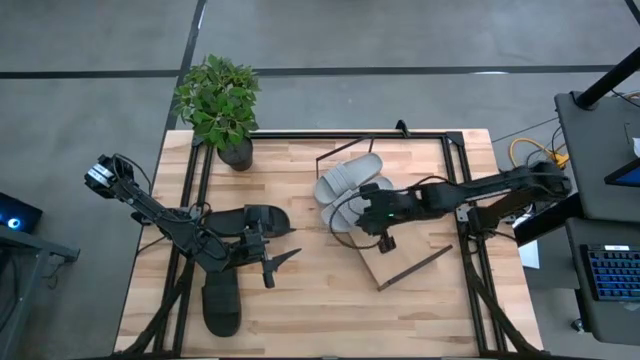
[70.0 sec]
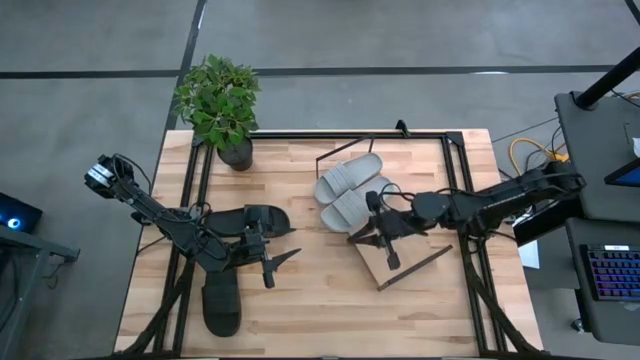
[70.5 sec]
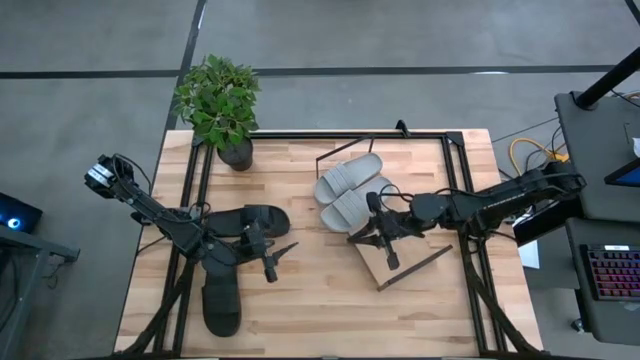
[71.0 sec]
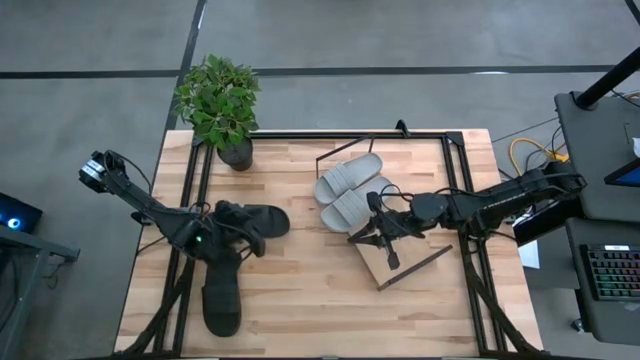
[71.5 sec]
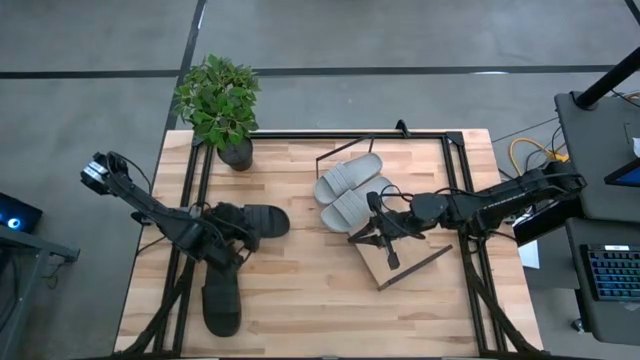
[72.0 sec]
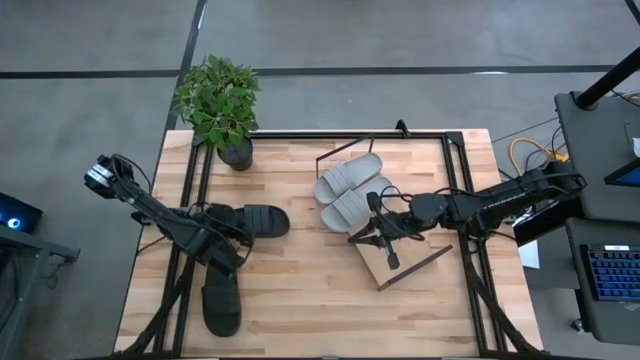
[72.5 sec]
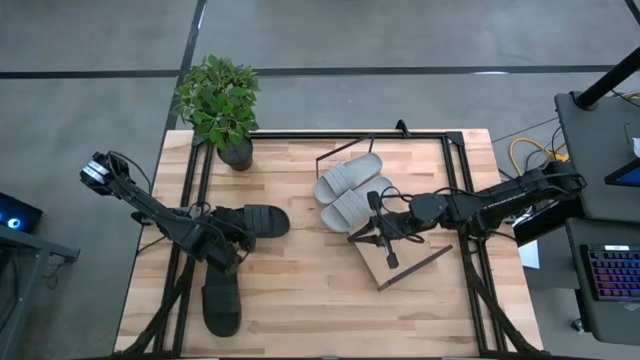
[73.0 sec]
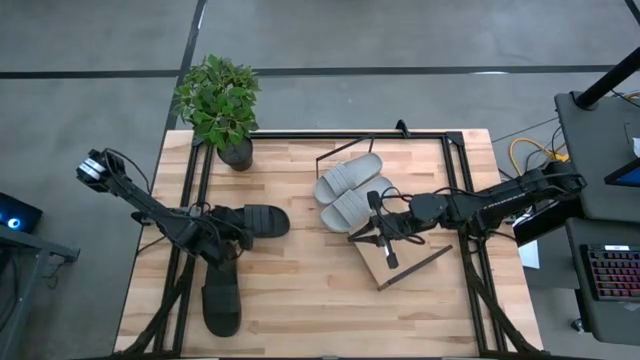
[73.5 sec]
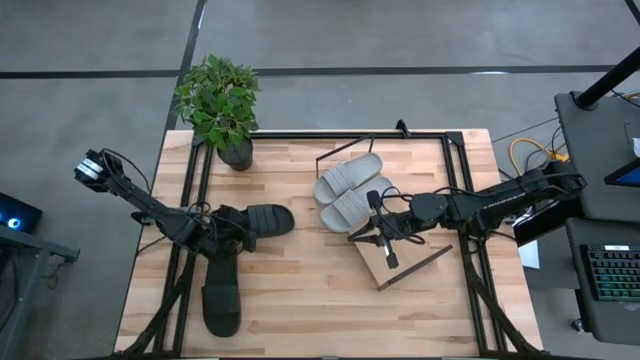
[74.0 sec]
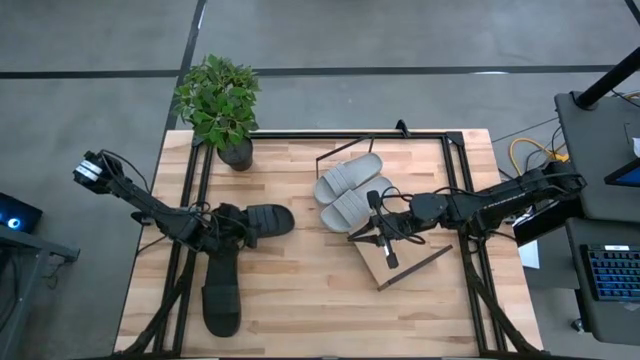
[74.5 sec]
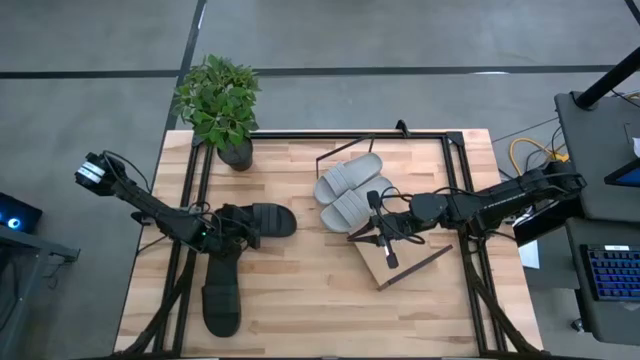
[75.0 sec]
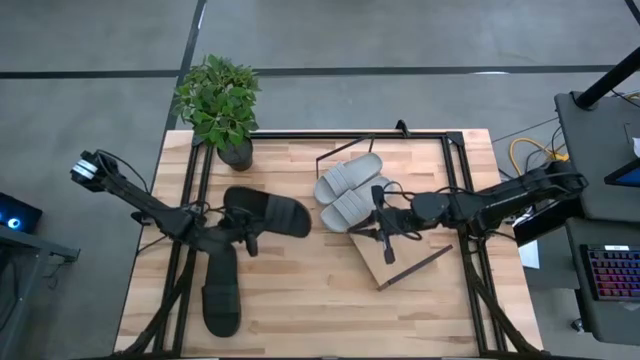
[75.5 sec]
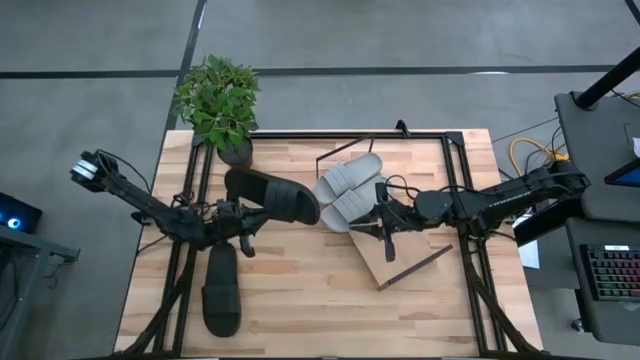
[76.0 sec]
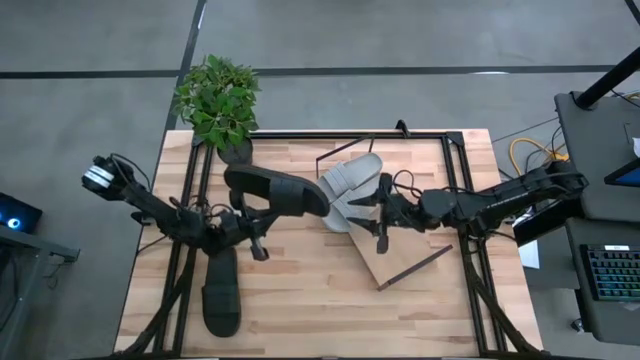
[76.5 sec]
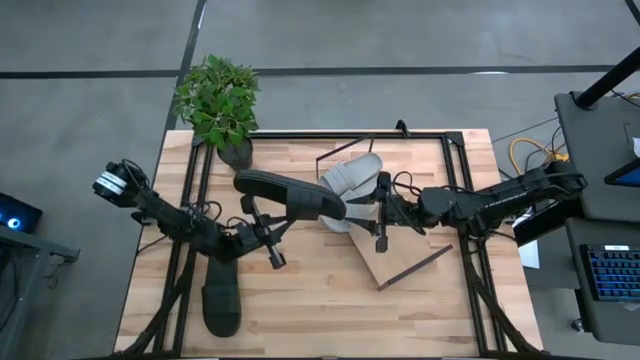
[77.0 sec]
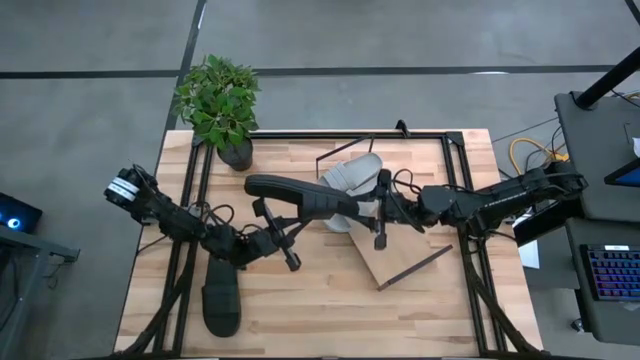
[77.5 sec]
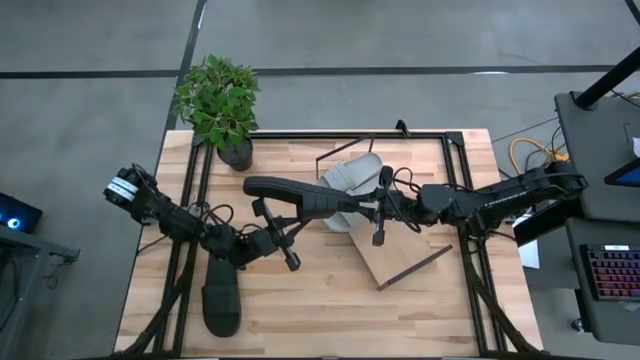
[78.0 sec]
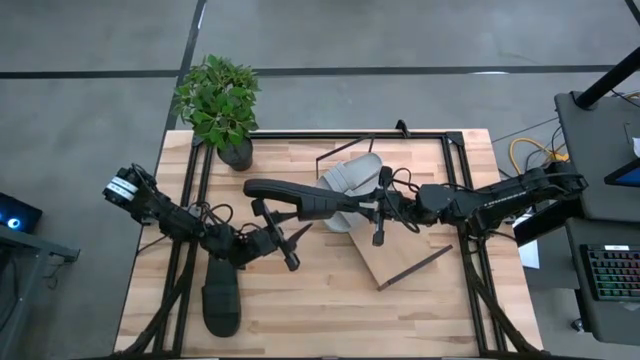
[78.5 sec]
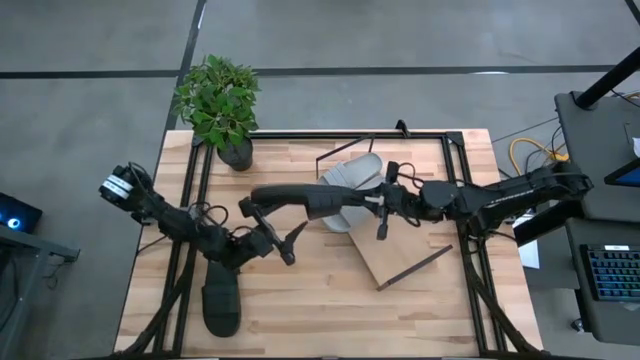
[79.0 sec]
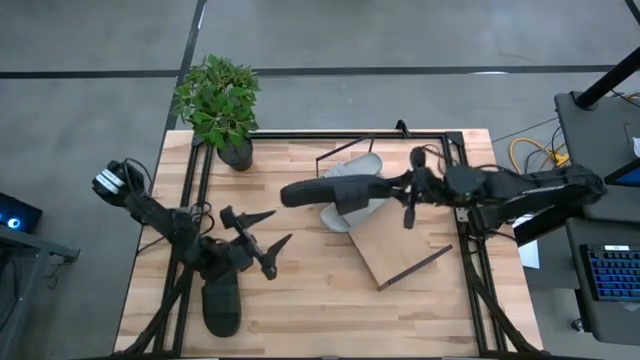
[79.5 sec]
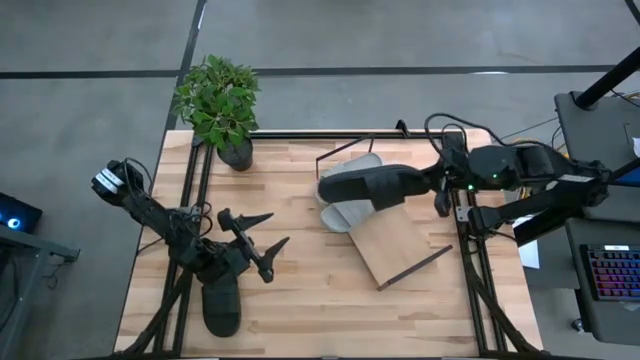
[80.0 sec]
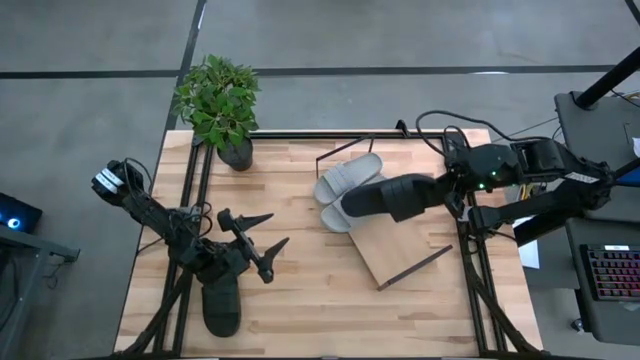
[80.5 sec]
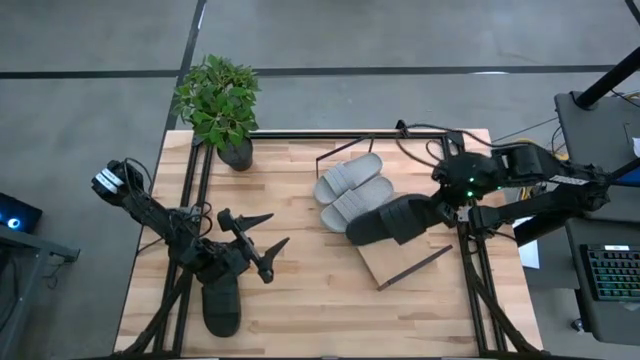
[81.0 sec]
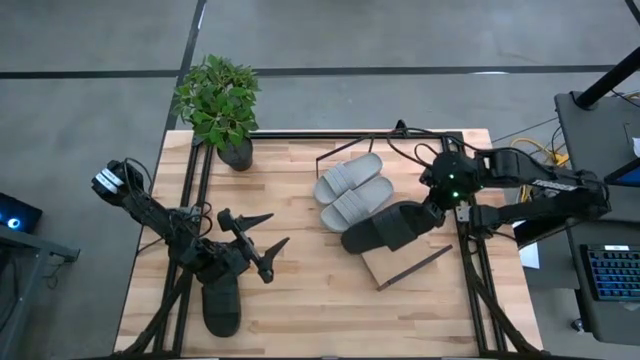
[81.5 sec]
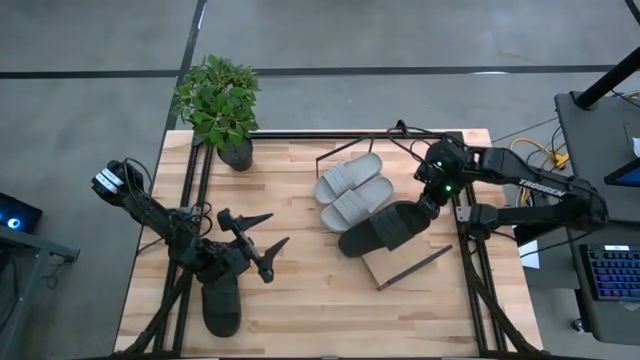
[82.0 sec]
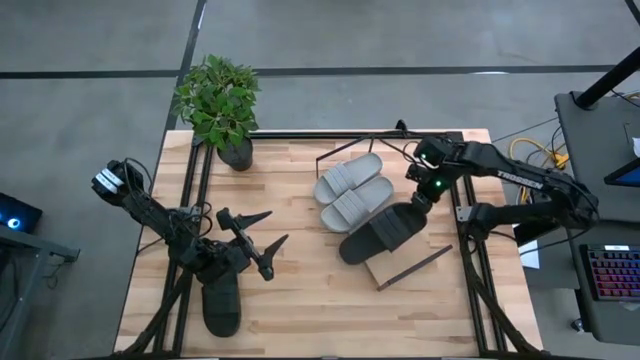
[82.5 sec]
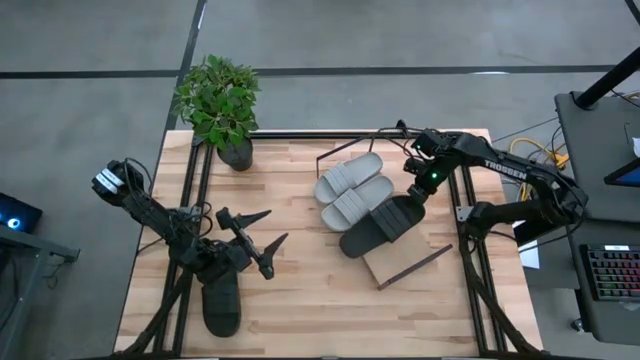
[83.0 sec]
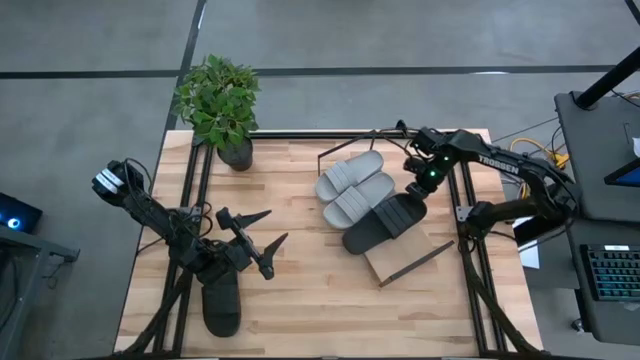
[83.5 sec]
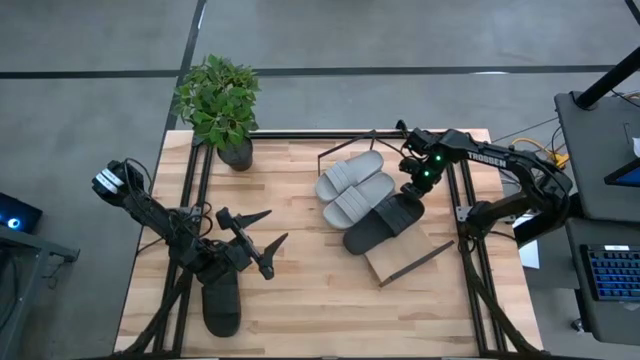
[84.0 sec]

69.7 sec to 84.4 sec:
Task: Pick and place slides into the shelf
Put the top black slide on the shelf

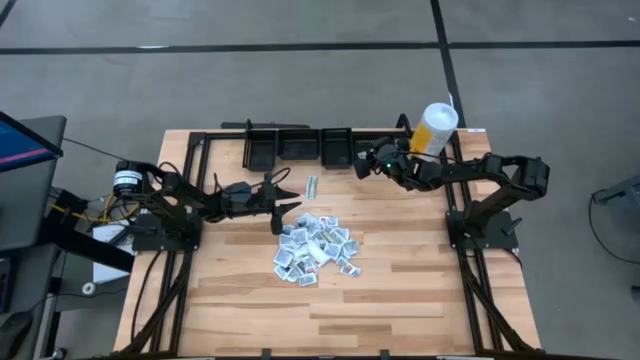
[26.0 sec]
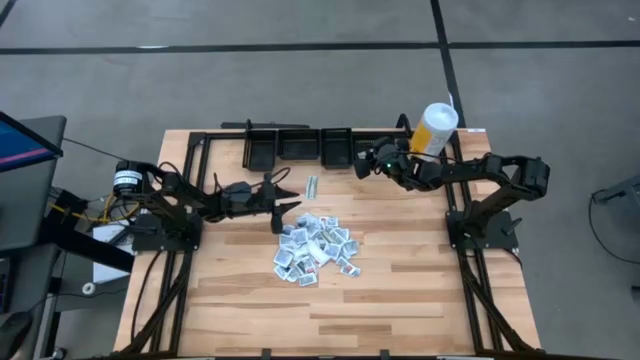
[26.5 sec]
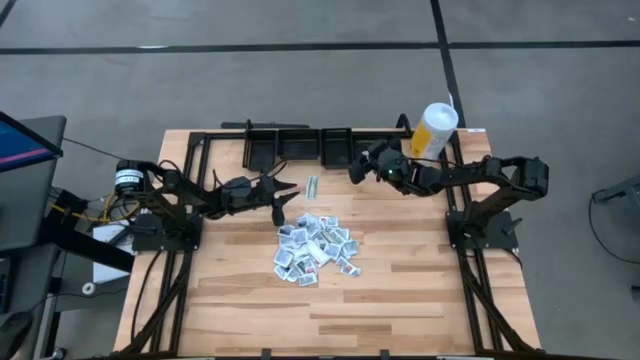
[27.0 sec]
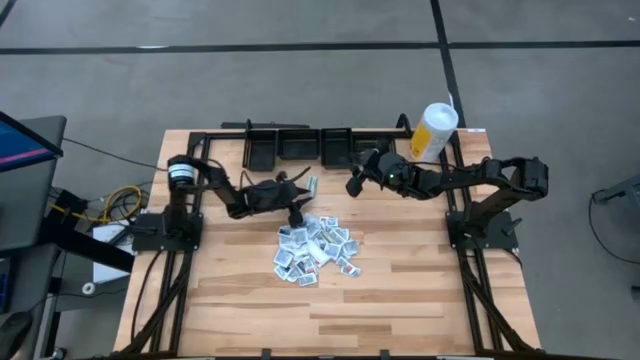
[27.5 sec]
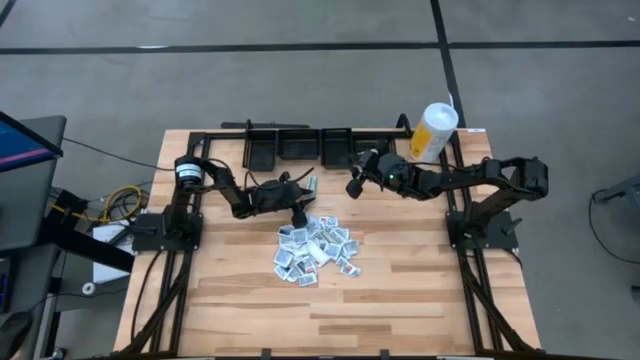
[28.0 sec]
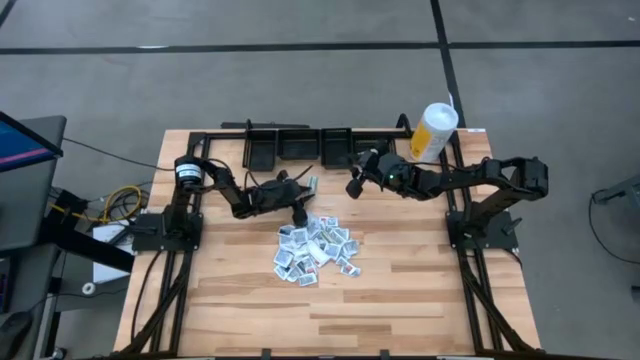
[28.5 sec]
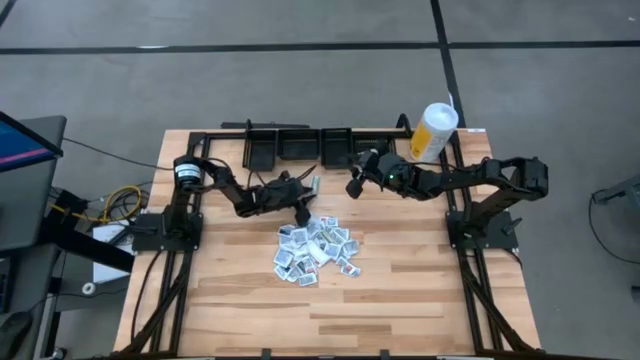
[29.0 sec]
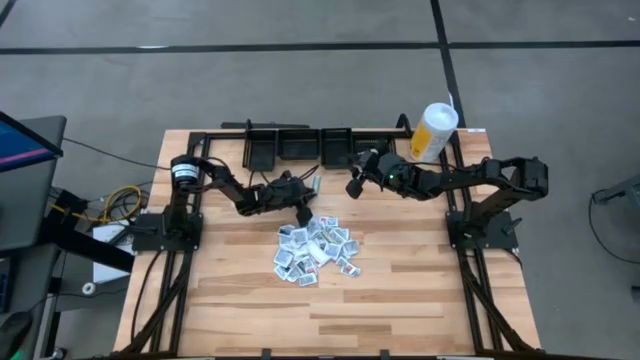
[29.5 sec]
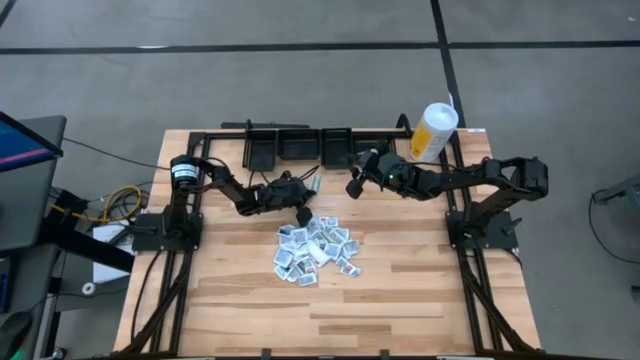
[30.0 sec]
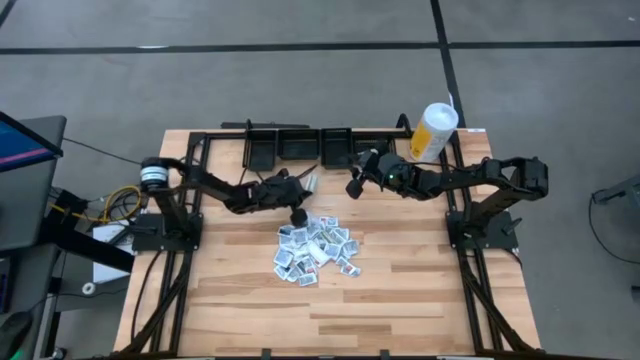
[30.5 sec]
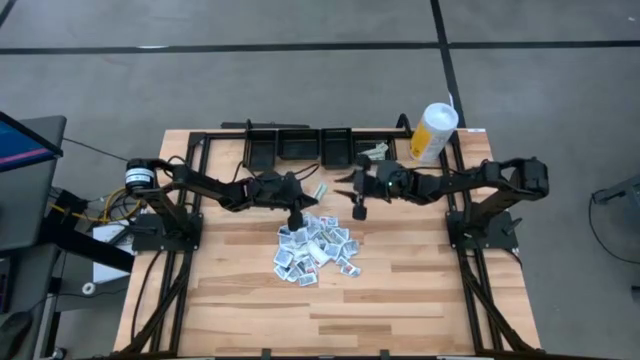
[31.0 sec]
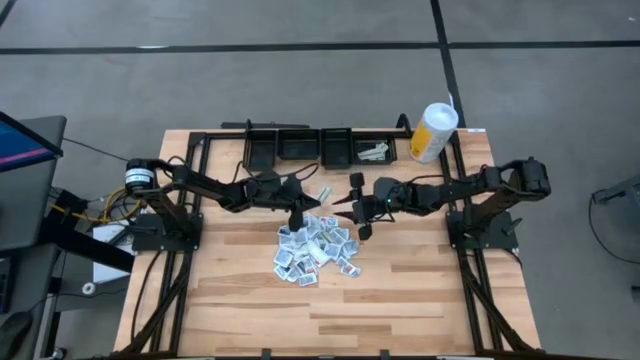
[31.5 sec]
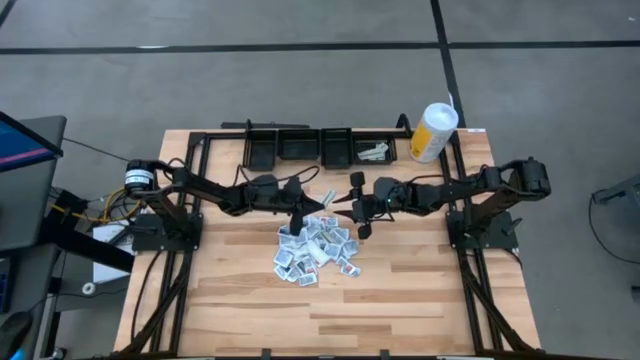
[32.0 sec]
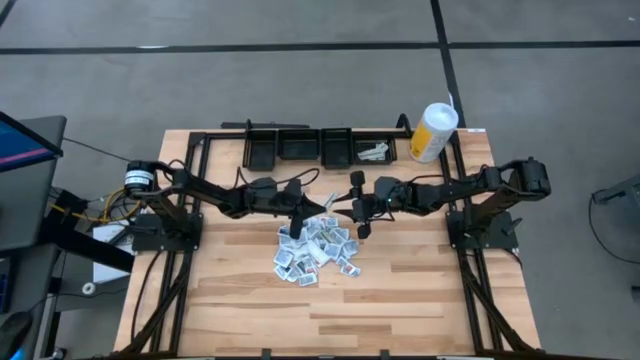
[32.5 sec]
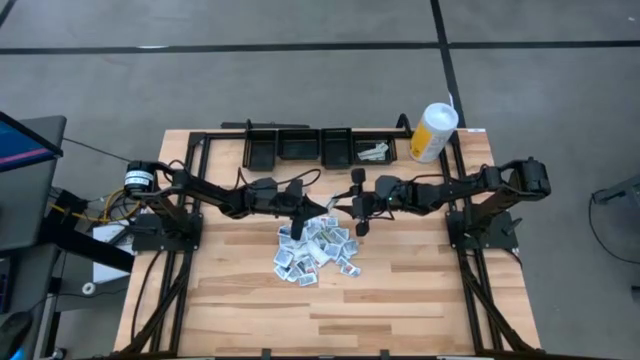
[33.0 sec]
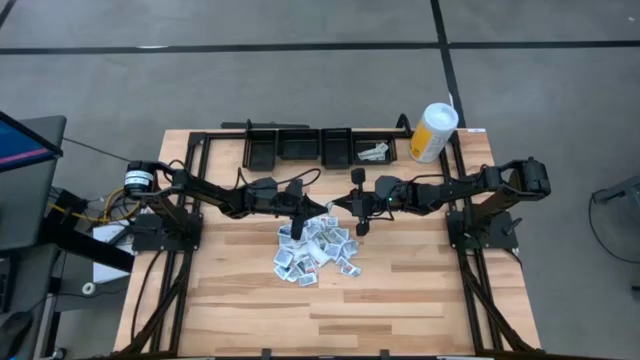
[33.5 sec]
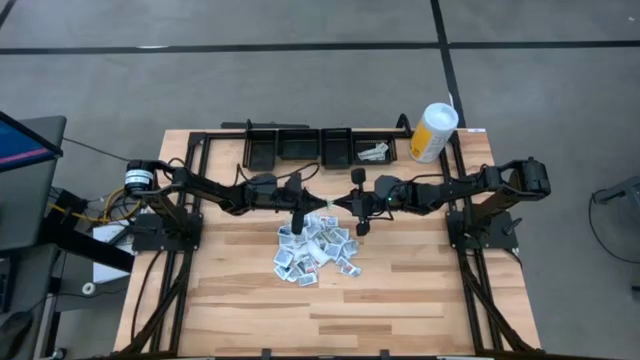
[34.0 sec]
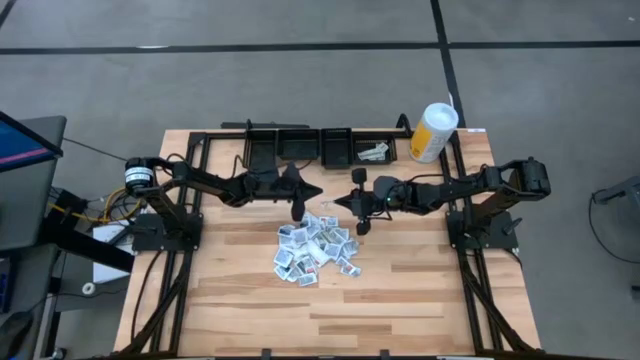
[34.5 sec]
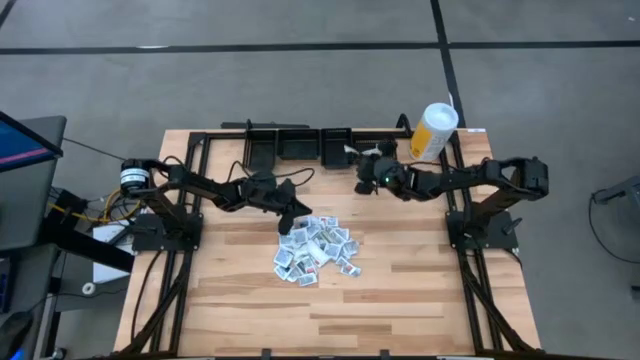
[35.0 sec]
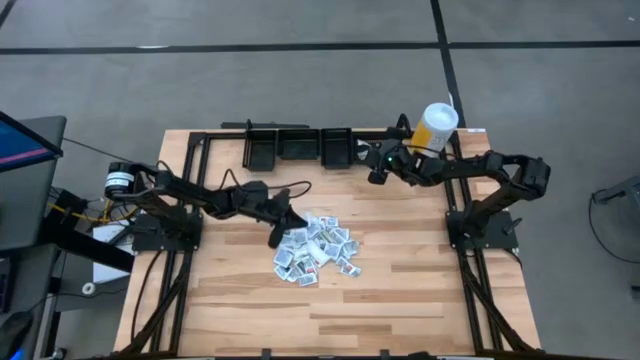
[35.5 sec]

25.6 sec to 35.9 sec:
Task: Pick & Place First Aid Supplies
Put the green bandage pack into the right black bin
